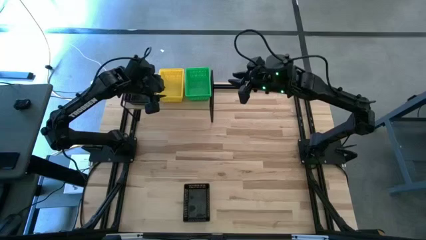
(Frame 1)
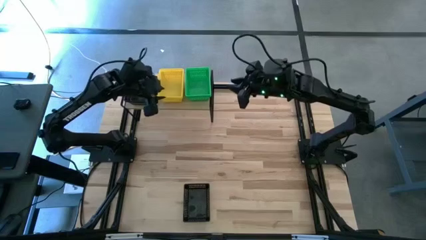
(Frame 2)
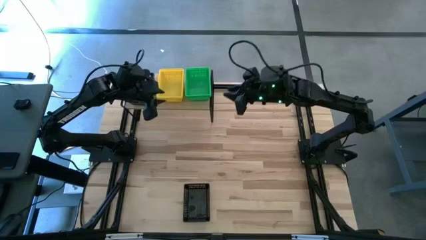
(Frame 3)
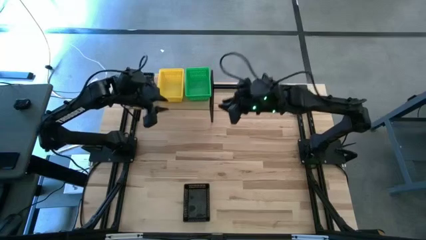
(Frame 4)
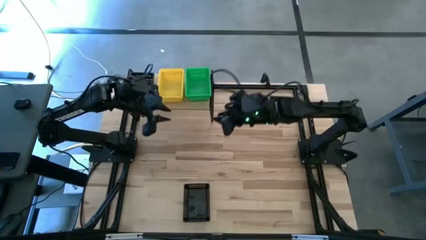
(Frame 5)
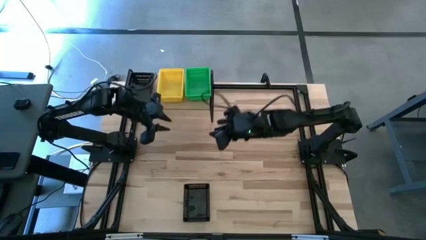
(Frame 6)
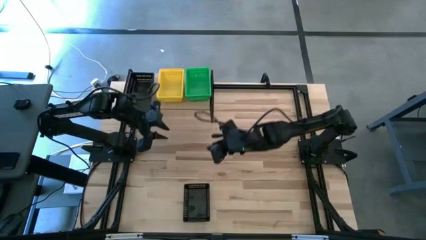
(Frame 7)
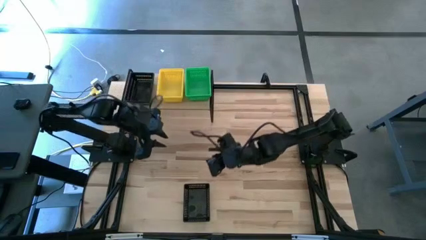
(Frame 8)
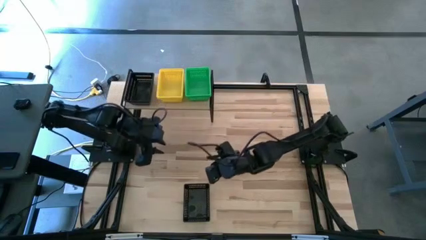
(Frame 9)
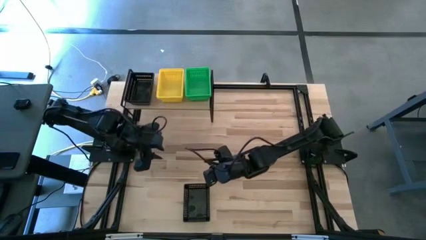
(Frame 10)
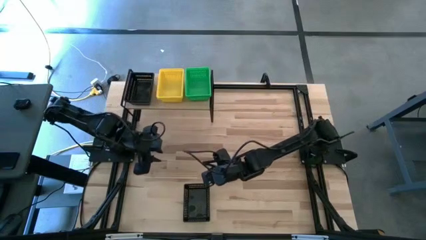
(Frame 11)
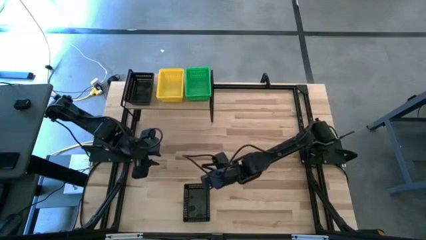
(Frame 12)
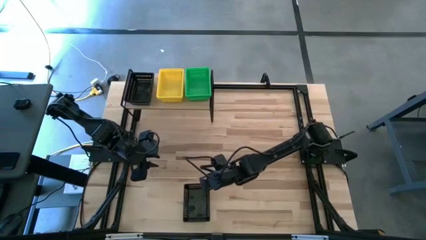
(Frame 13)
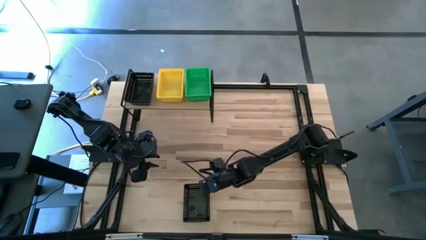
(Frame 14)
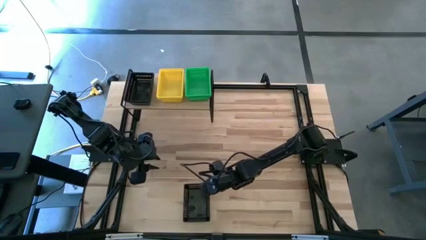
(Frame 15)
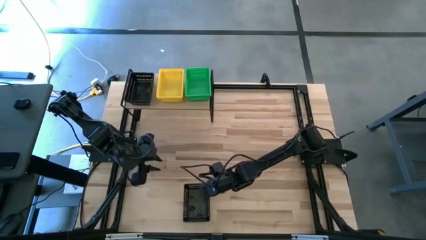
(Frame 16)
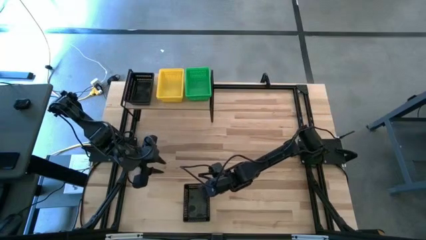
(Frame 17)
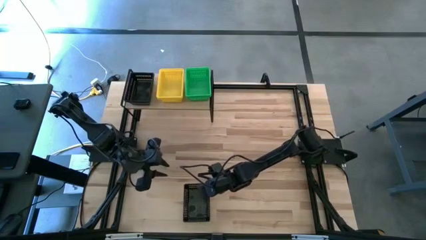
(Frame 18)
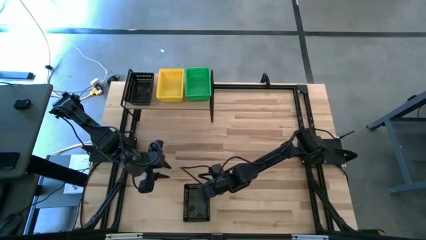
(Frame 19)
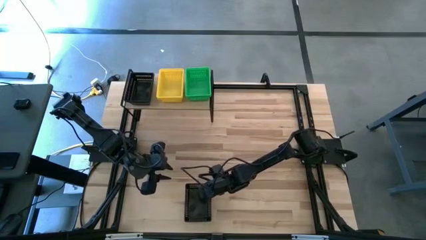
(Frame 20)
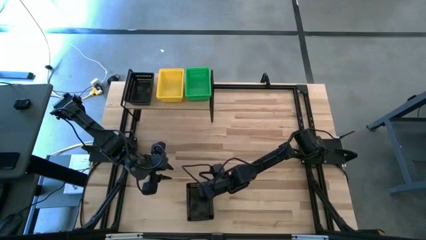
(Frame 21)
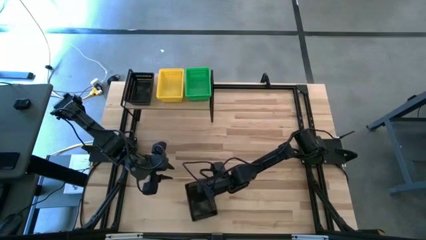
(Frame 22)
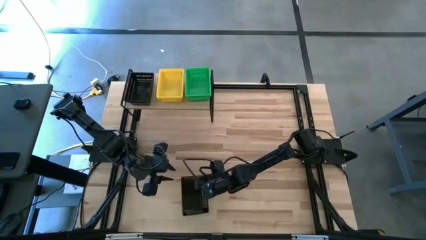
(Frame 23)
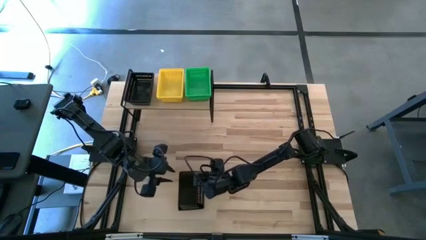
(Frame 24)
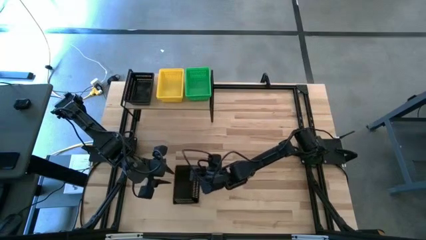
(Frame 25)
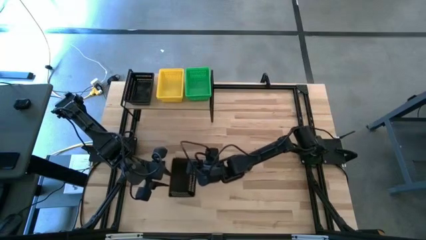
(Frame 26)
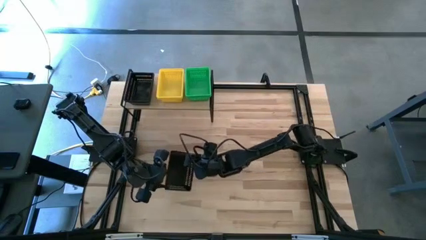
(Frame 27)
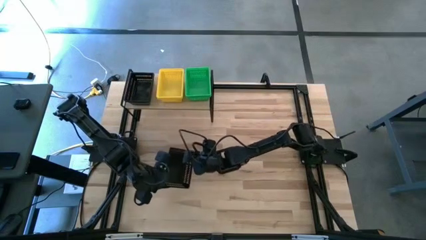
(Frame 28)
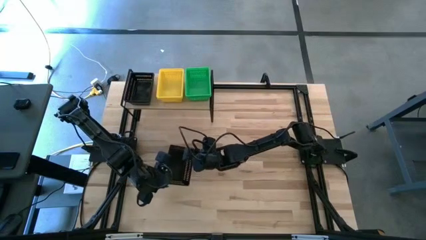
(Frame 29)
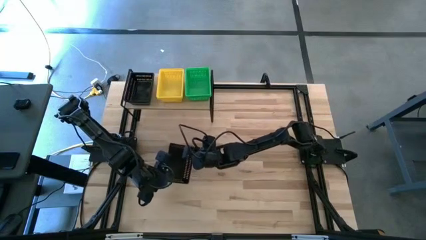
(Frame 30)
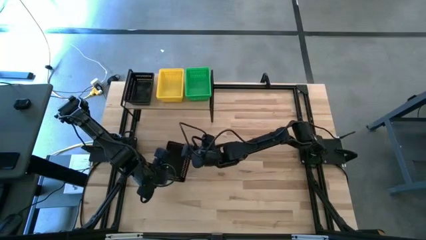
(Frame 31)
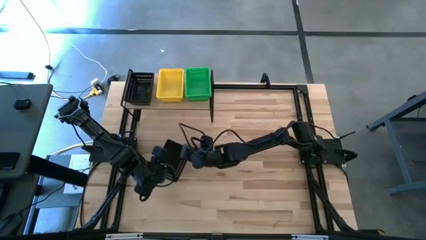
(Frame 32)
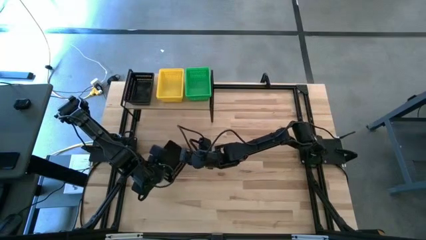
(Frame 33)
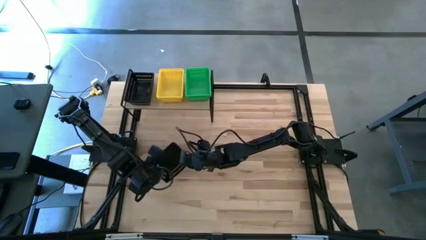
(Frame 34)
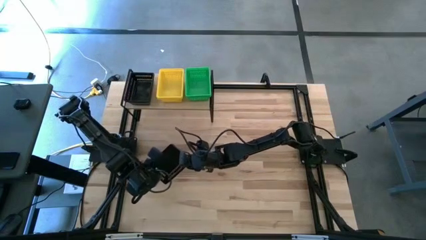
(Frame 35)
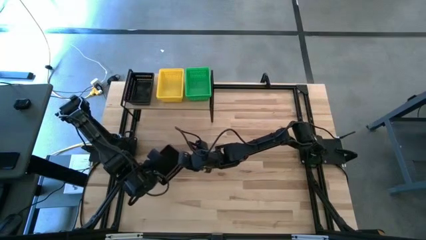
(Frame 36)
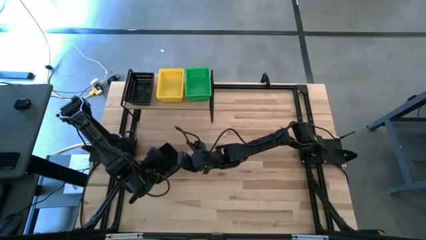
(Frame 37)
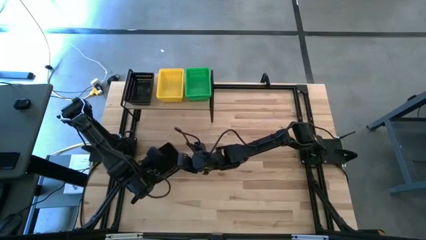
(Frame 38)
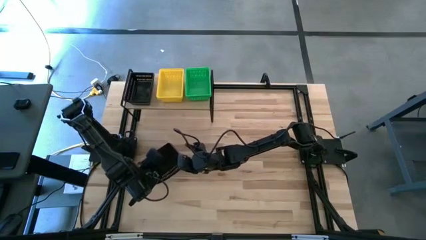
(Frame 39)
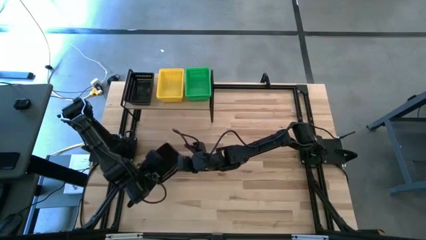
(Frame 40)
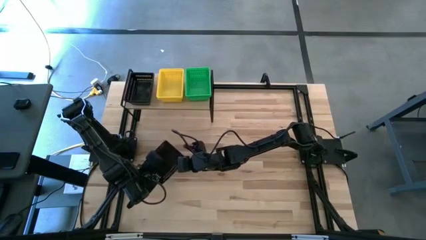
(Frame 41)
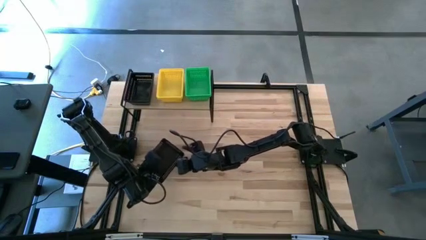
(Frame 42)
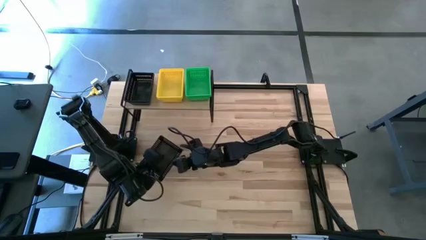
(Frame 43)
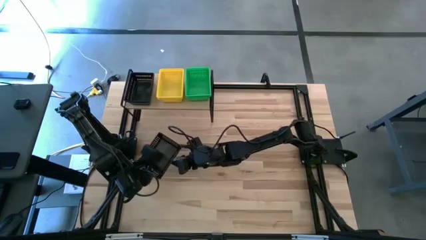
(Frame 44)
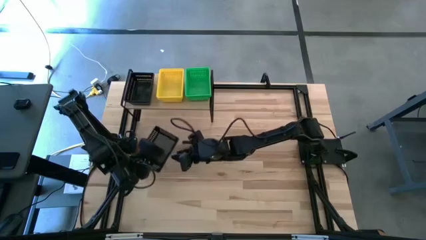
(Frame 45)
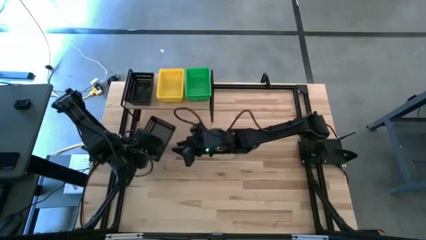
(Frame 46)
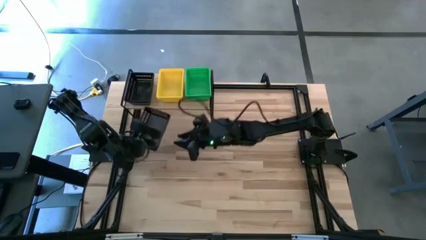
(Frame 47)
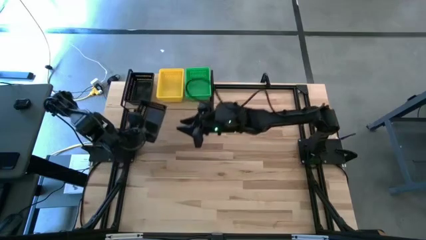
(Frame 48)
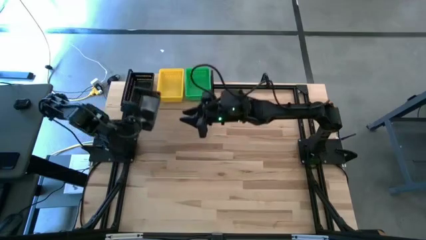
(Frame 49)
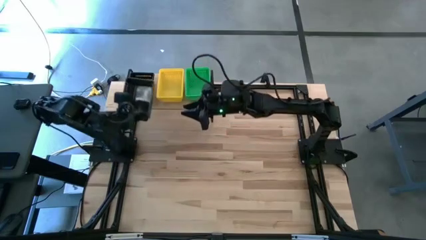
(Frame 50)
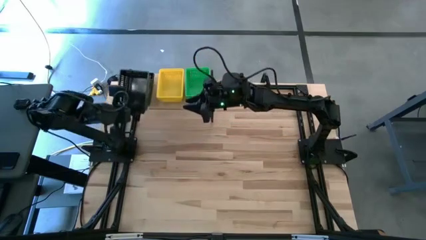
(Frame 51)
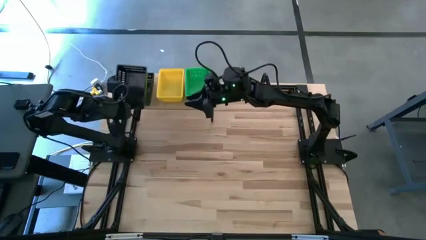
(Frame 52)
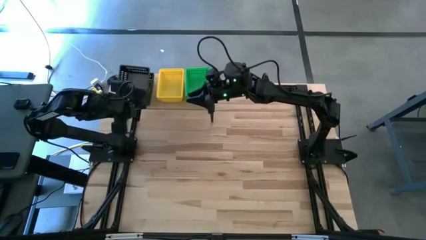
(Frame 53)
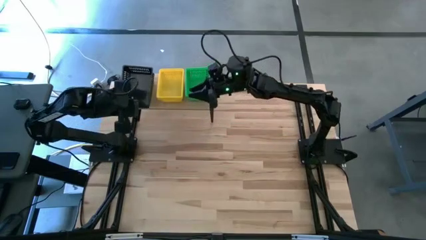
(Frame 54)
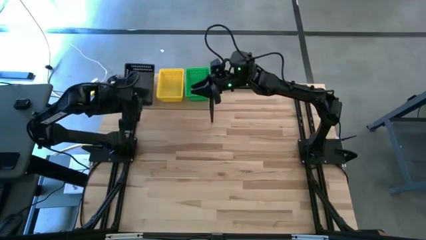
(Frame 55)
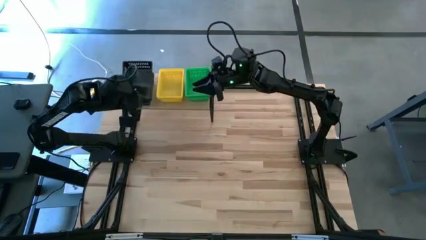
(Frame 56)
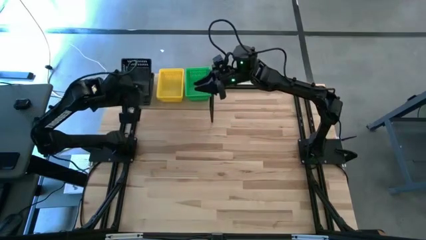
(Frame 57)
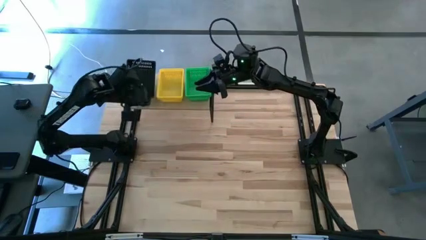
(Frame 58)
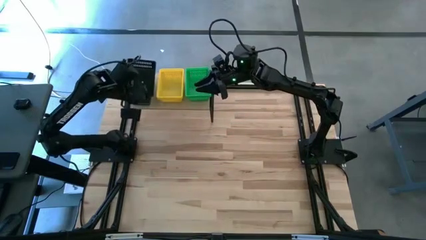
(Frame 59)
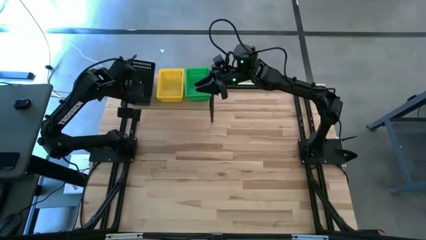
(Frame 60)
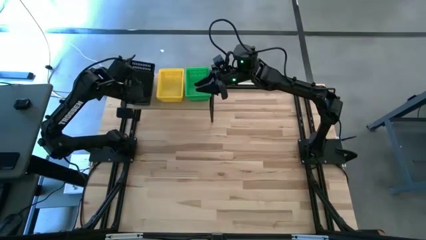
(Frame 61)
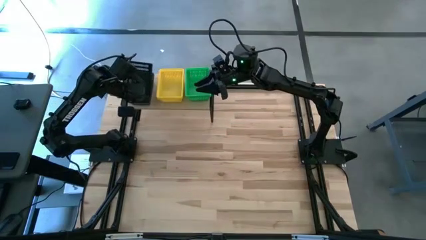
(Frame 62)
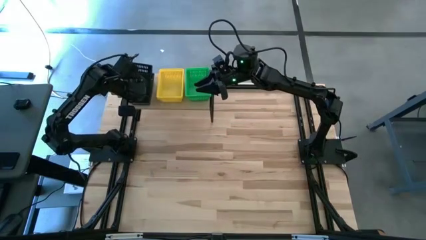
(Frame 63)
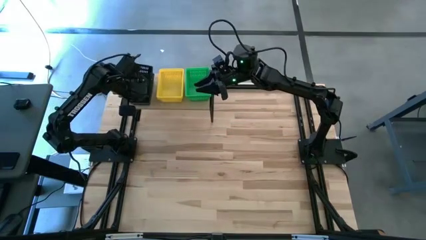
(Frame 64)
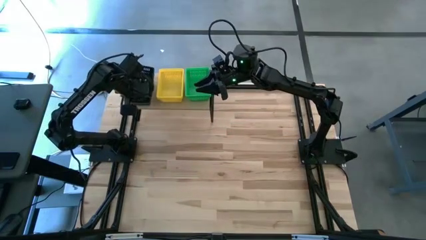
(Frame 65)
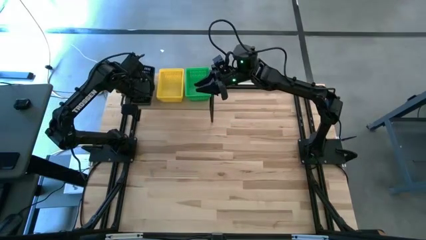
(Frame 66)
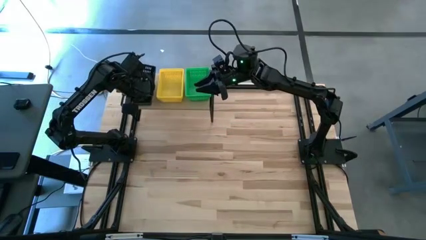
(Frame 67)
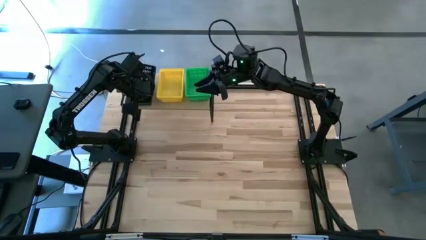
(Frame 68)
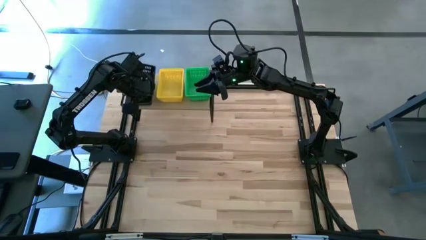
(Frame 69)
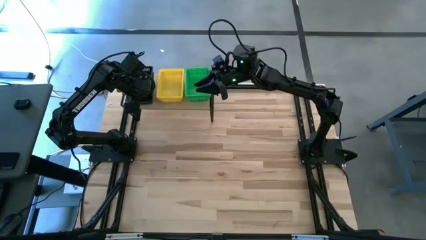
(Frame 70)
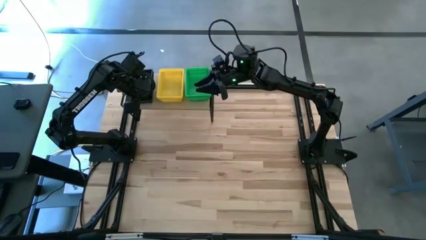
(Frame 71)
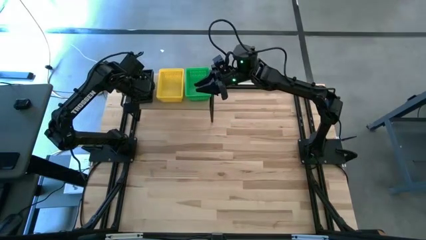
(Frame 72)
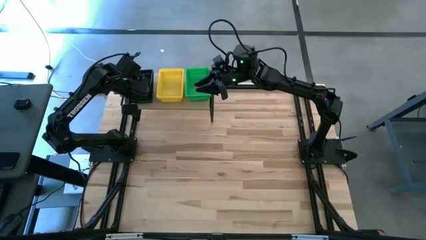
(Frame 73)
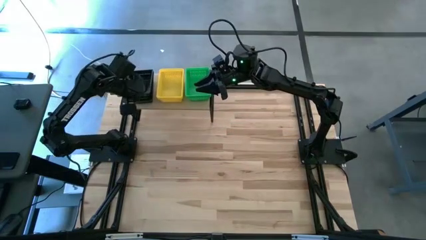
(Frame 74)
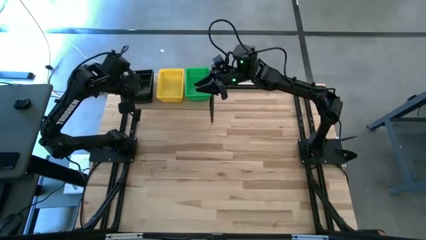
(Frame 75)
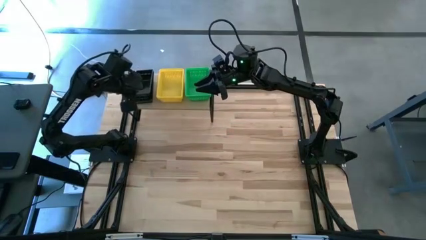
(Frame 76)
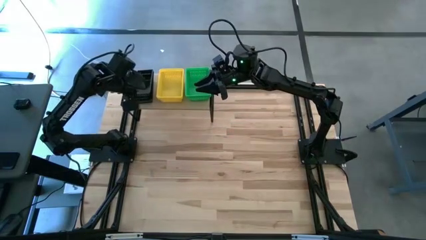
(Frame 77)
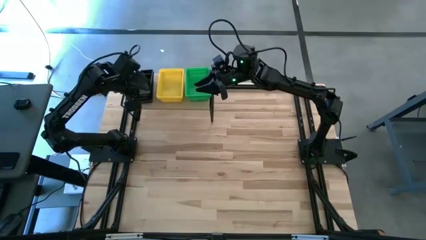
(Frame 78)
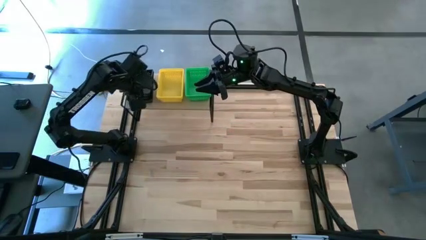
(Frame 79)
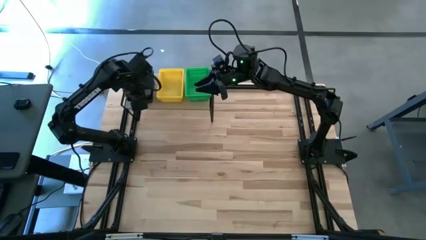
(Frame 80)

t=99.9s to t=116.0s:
Task: Stack baskets on shelf by color
Stack the black bin on top of the black bin
